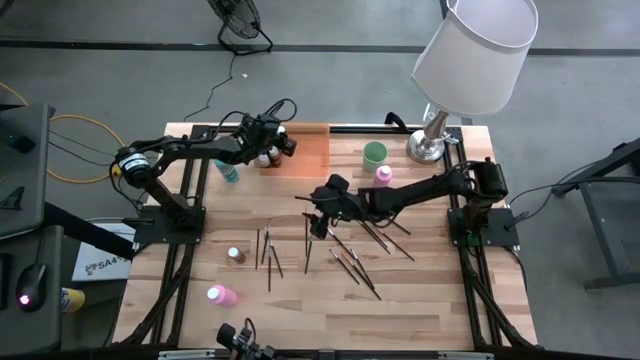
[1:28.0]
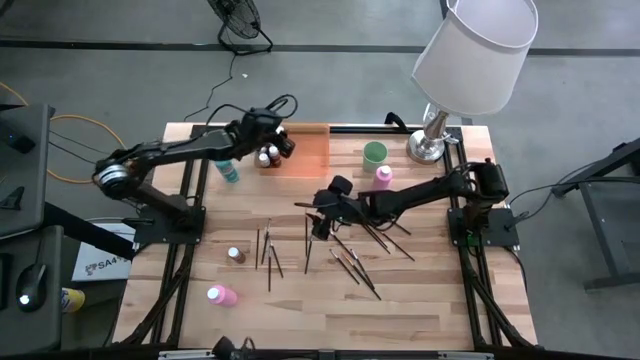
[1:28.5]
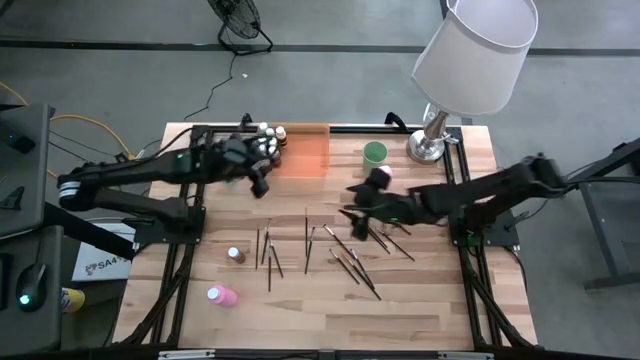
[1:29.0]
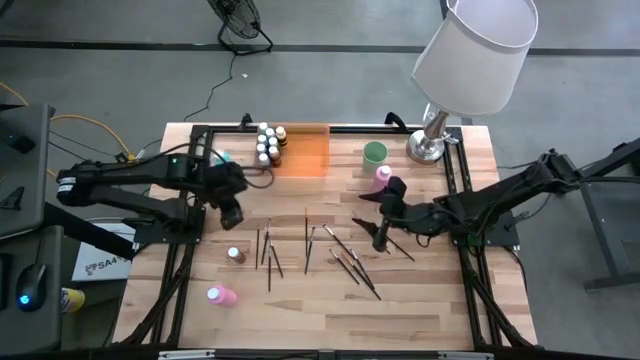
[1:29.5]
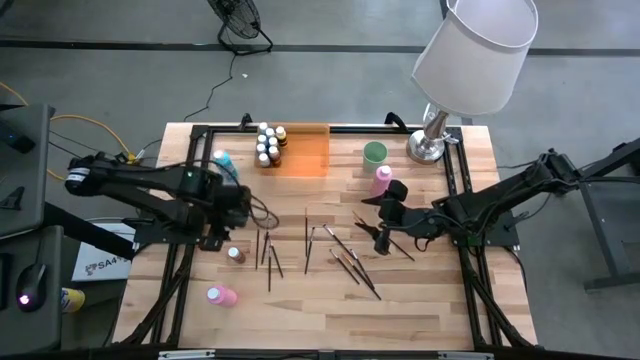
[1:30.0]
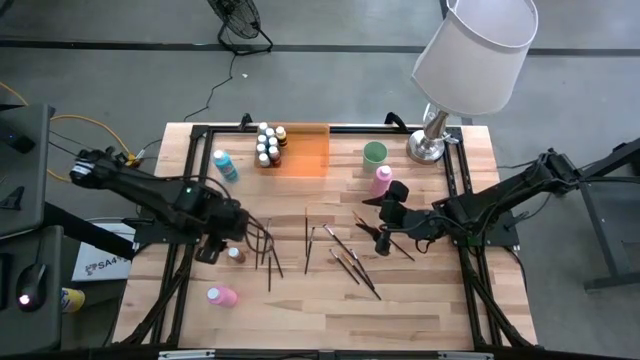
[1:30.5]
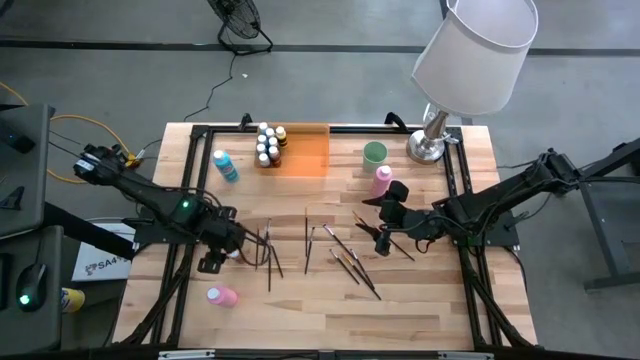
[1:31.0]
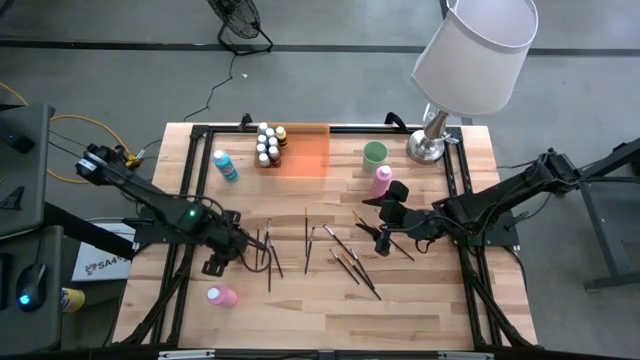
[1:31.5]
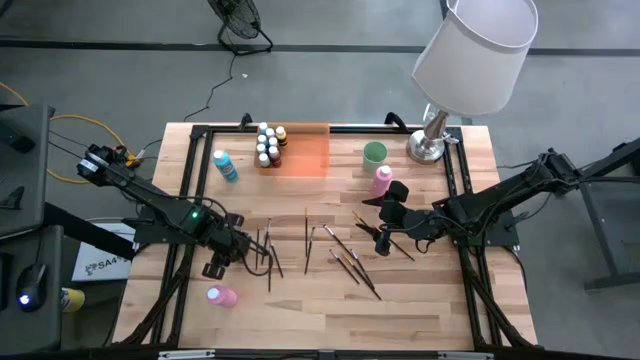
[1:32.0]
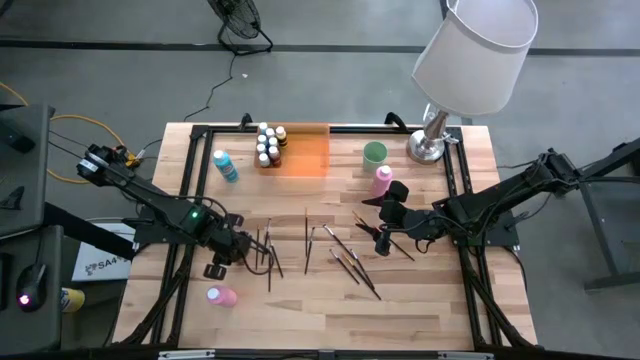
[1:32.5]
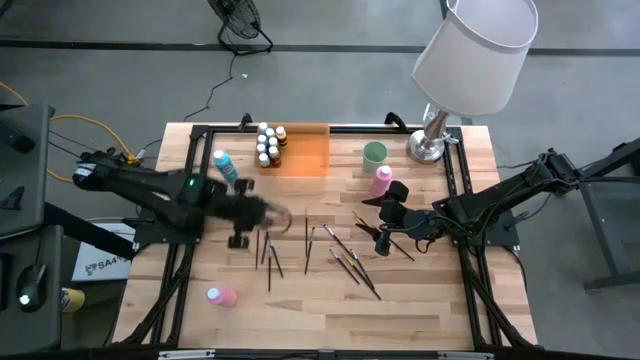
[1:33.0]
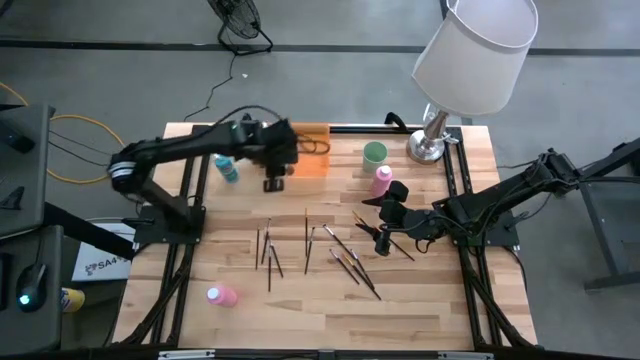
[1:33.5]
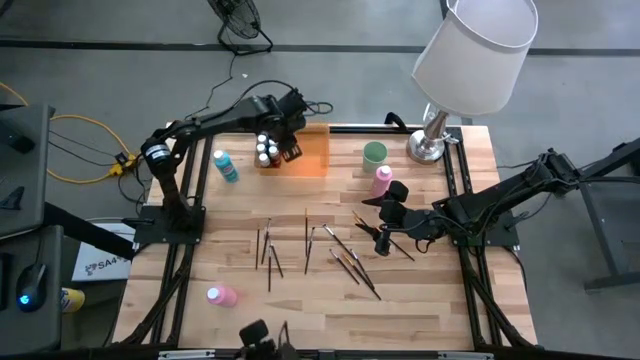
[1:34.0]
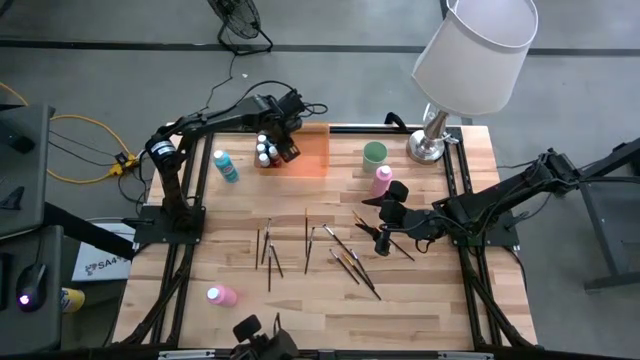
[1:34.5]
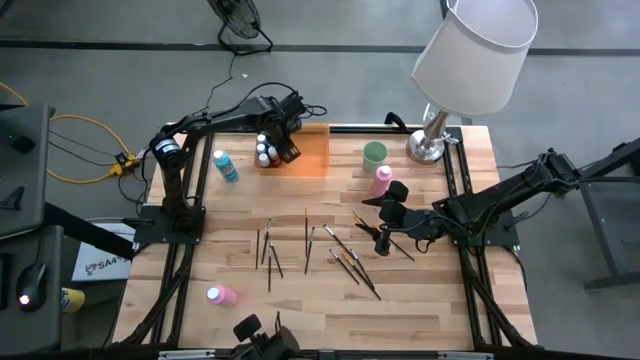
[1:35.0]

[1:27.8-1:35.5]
Task: Pick & Place Paint Supplies
Put the brown paint bottle into the orange bin

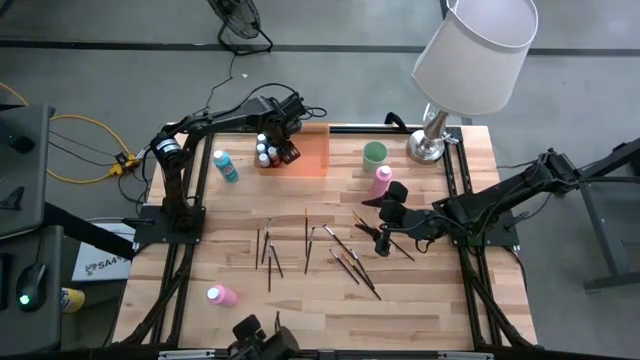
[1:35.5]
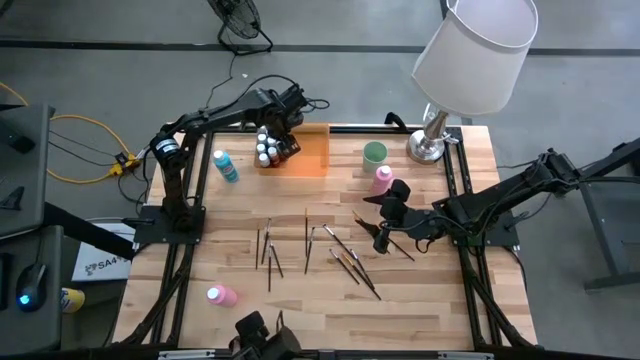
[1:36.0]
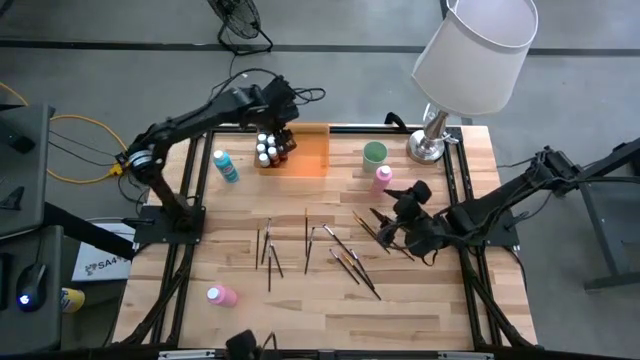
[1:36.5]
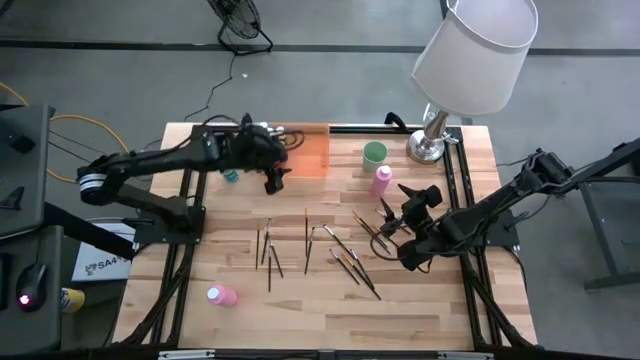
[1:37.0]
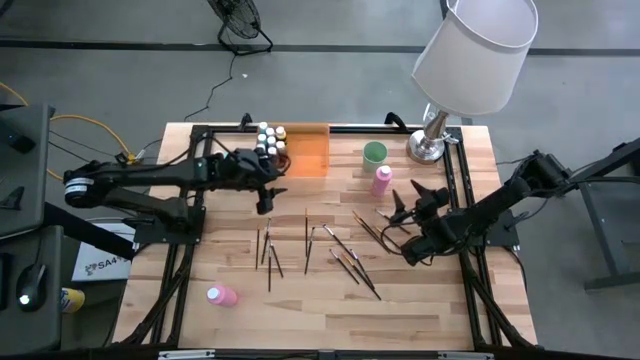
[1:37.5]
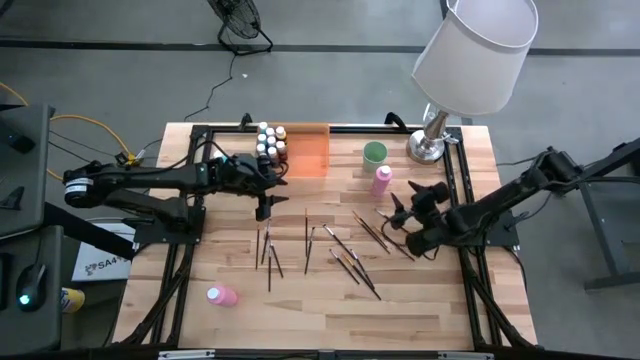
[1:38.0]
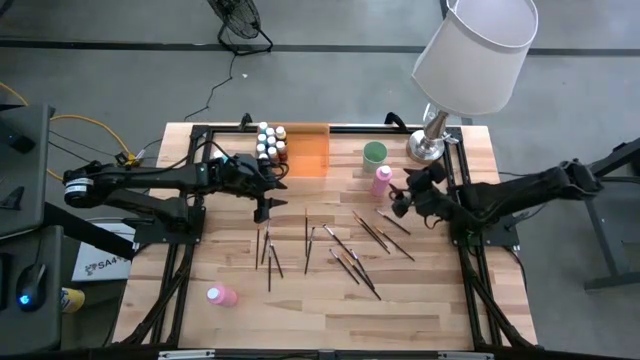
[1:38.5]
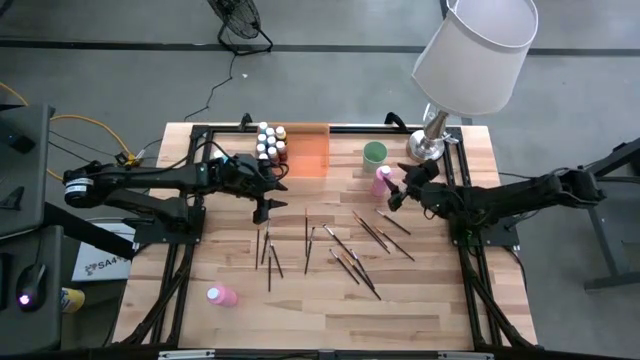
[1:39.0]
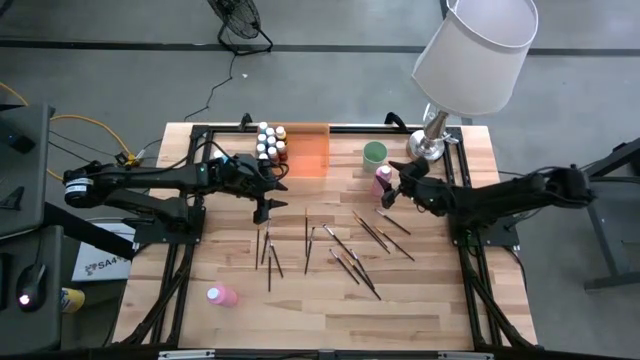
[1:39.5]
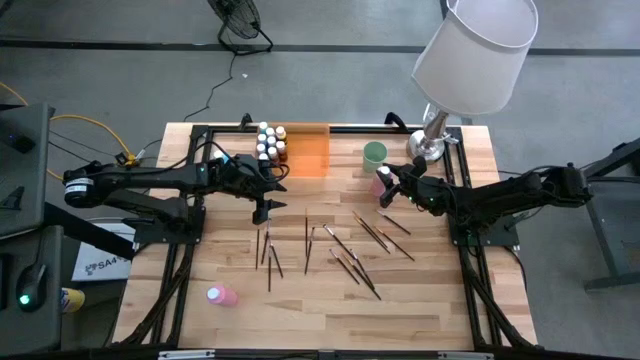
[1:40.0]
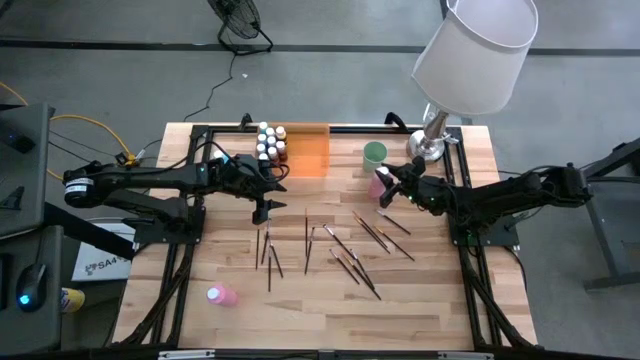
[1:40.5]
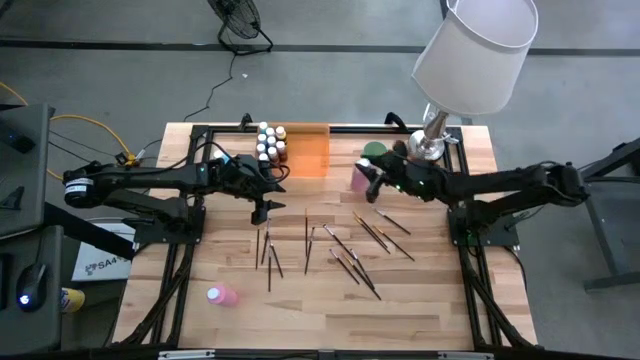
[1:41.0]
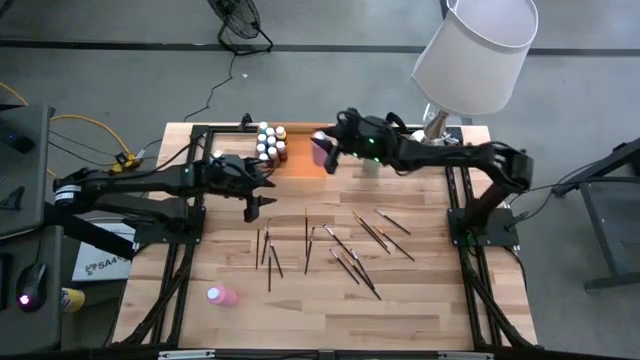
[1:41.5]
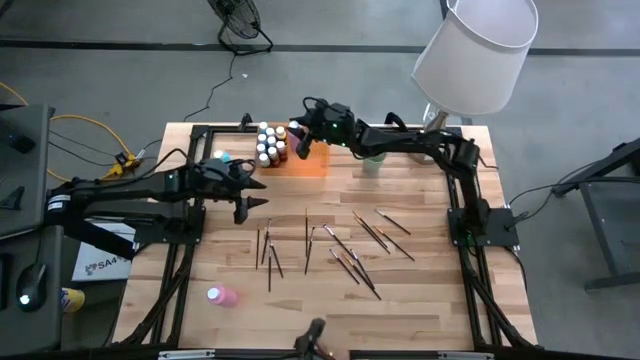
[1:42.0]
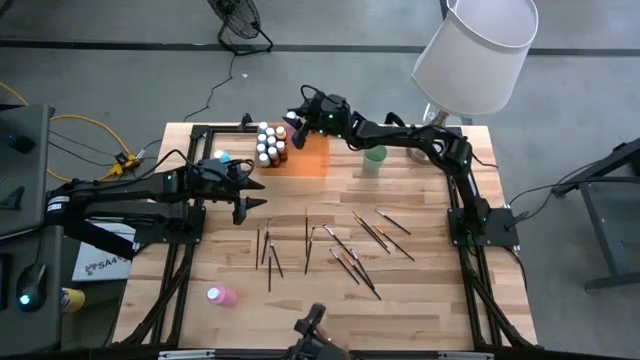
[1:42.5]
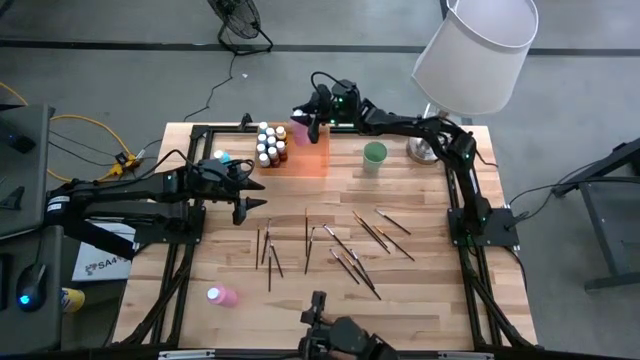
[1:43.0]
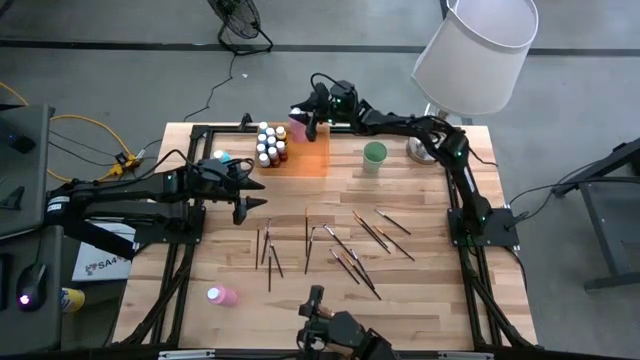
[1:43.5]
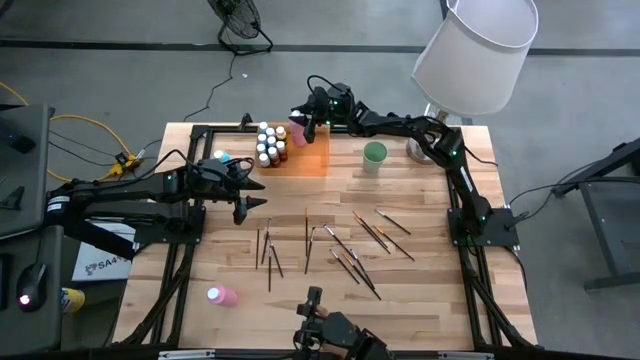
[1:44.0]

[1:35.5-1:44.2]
Put the large pink paint bottle into the orange bin

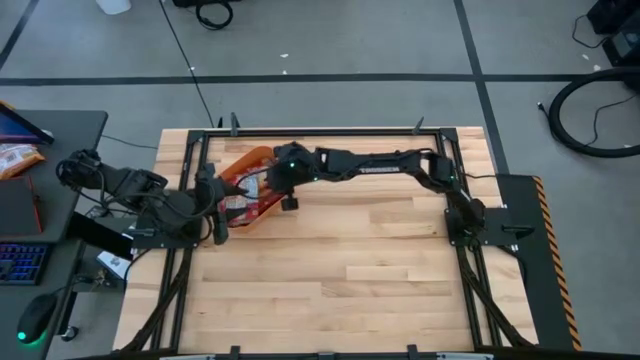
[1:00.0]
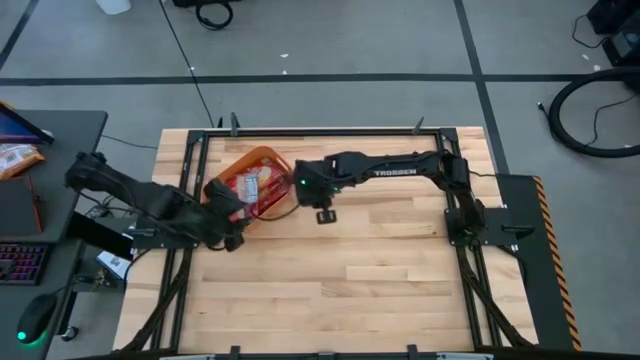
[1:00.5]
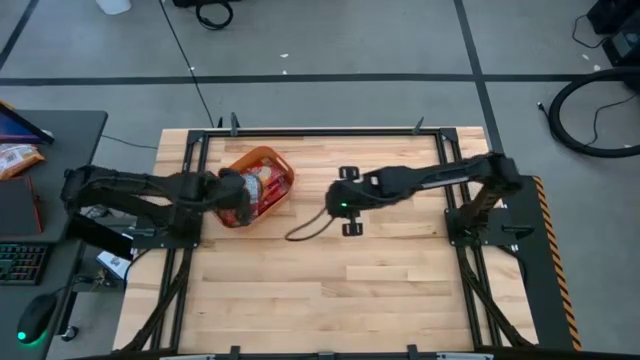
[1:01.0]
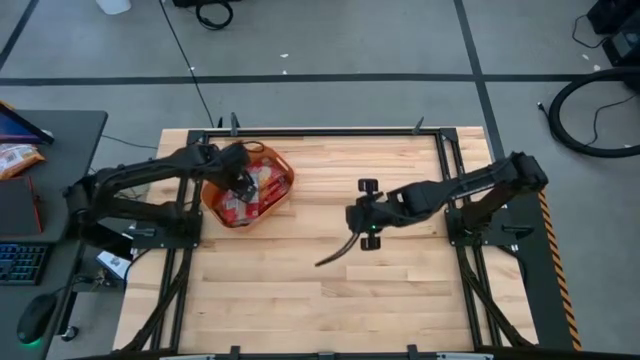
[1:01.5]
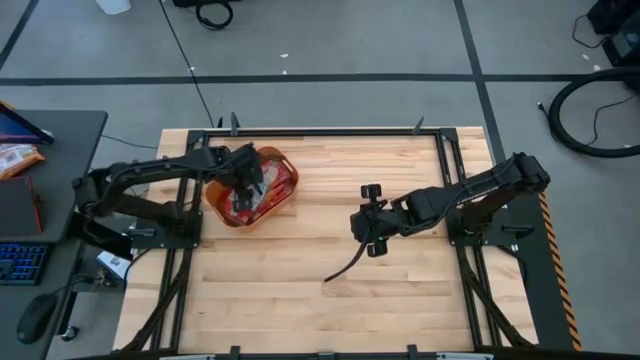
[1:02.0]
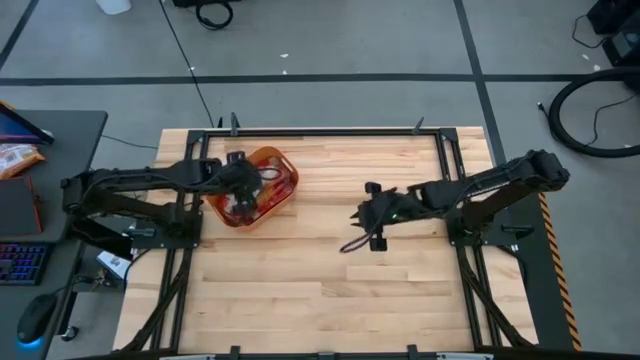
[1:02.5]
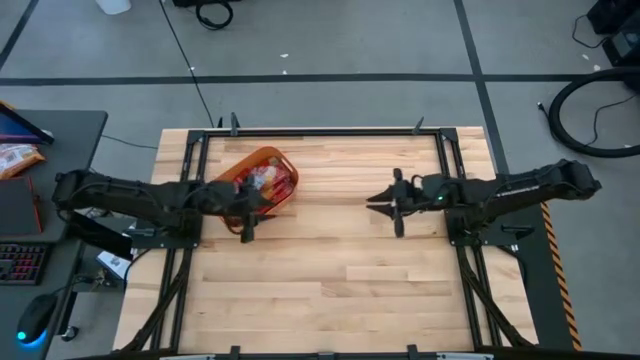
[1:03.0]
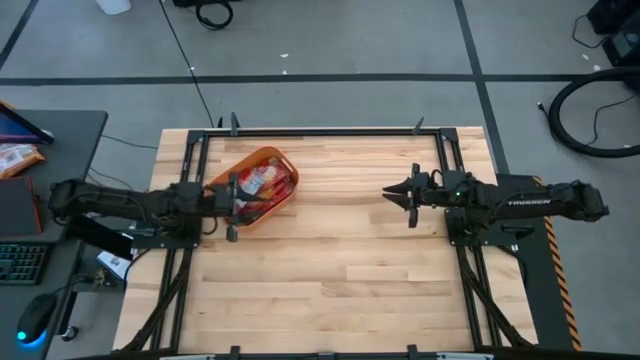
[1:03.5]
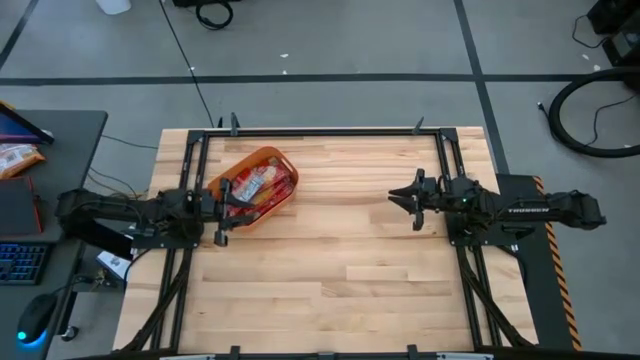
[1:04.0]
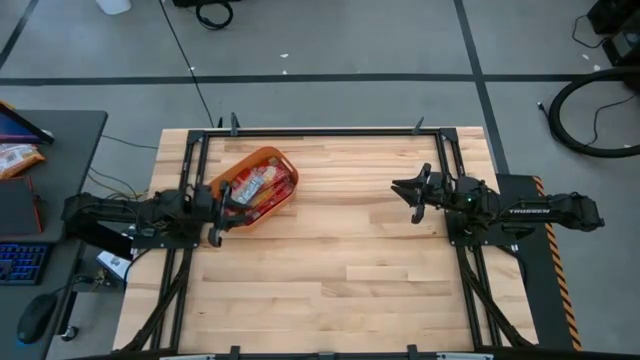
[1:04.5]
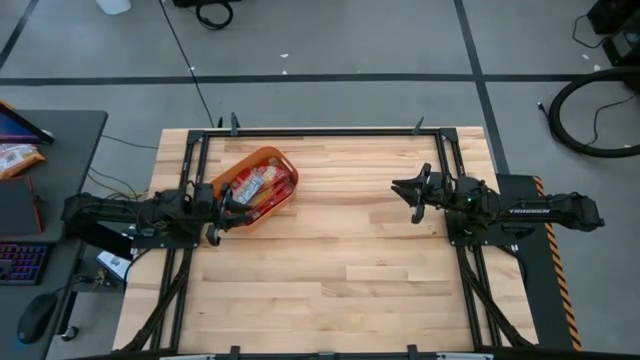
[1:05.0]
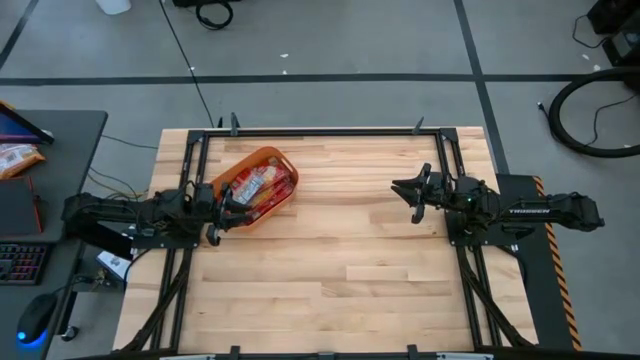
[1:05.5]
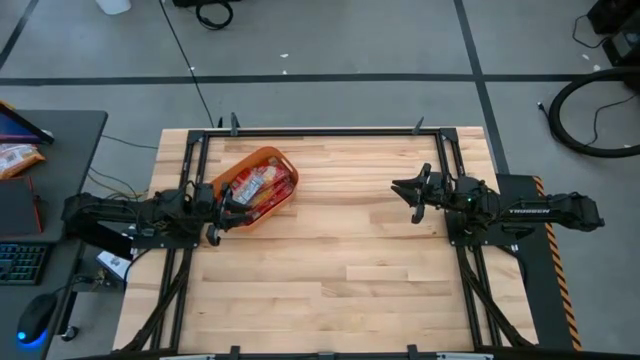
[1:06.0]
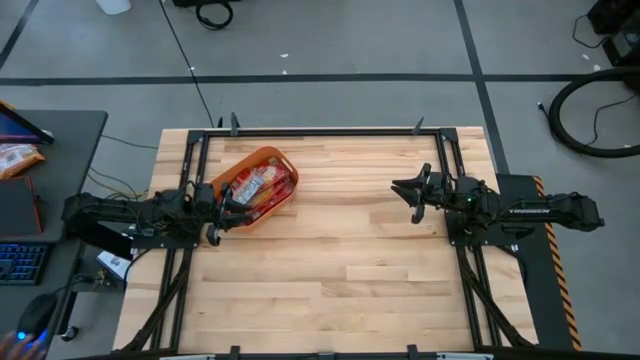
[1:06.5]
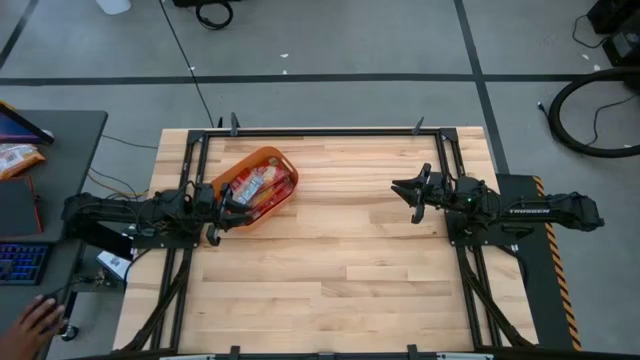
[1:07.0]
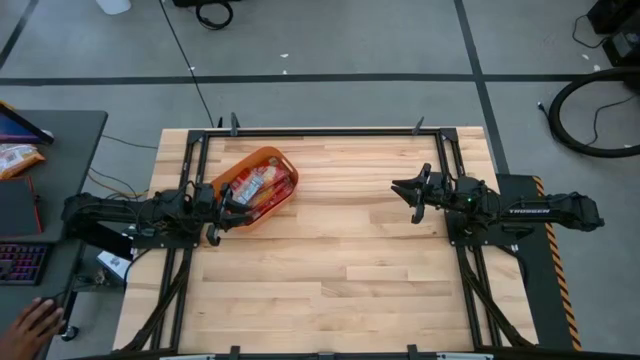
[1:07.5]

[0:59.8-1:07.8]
Task: Sort popcorn bags into baskets
Return to Home Position
